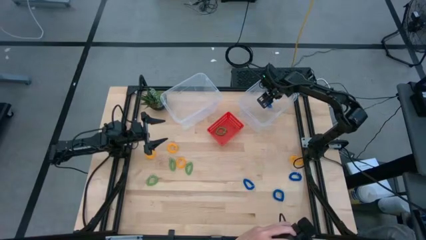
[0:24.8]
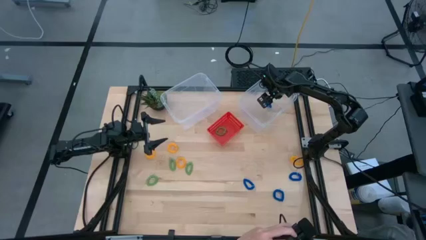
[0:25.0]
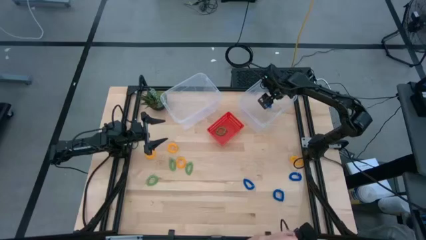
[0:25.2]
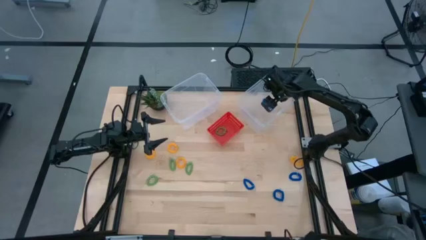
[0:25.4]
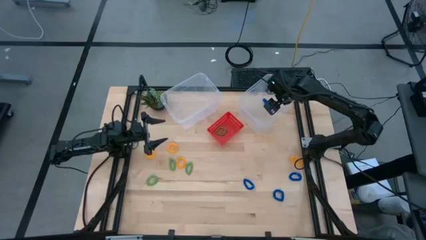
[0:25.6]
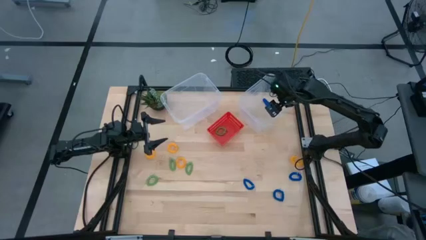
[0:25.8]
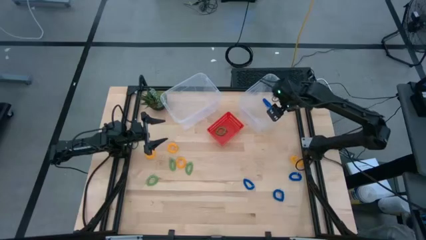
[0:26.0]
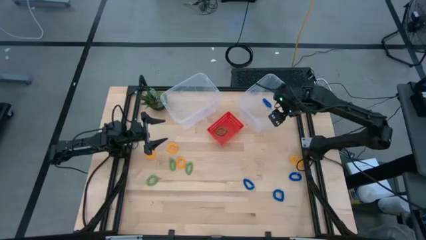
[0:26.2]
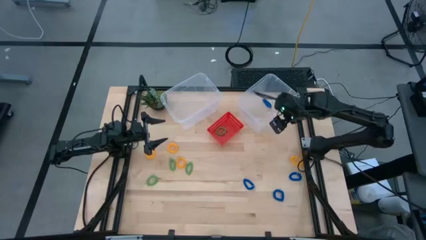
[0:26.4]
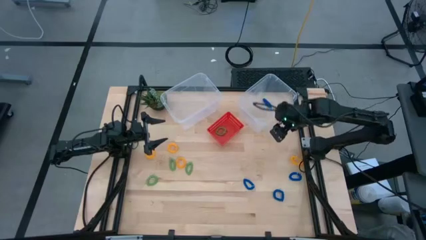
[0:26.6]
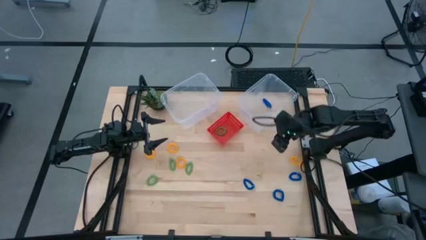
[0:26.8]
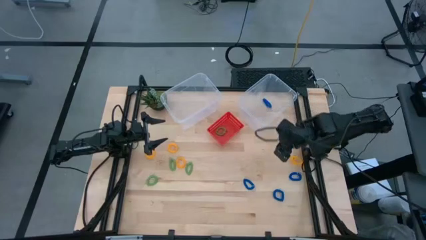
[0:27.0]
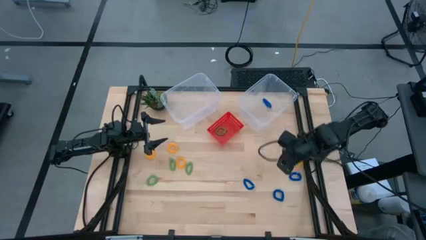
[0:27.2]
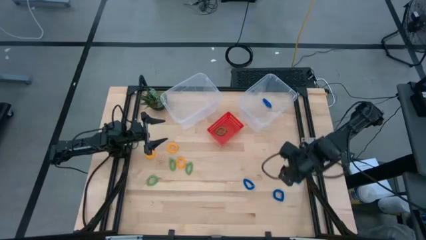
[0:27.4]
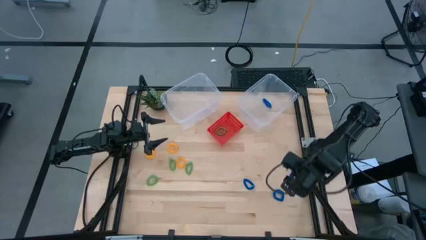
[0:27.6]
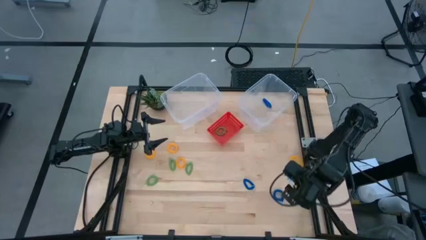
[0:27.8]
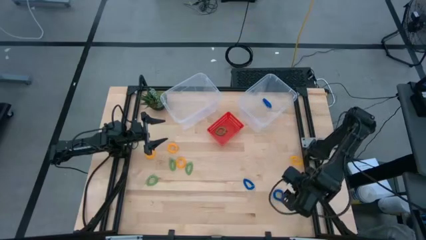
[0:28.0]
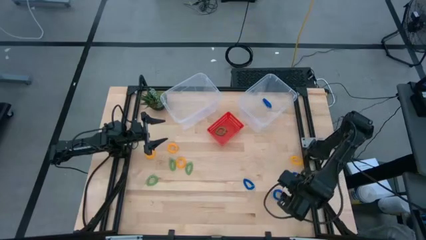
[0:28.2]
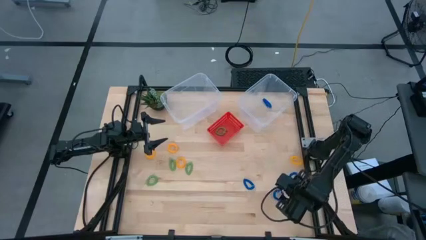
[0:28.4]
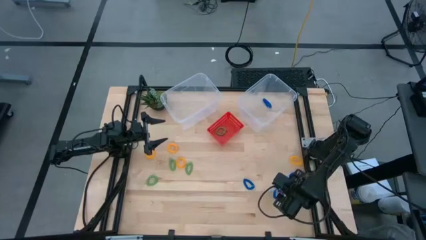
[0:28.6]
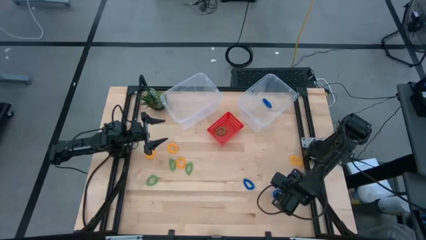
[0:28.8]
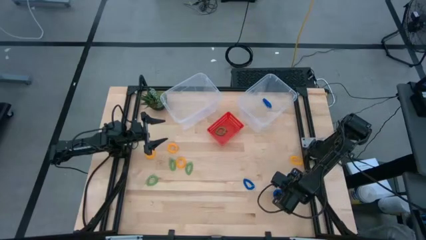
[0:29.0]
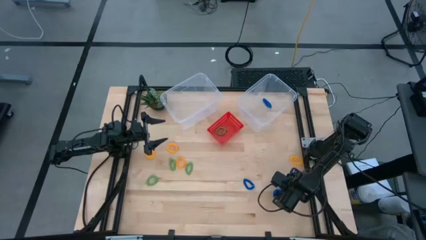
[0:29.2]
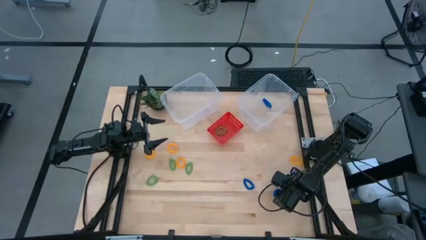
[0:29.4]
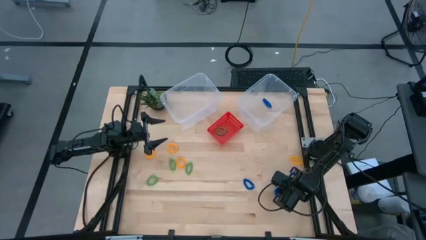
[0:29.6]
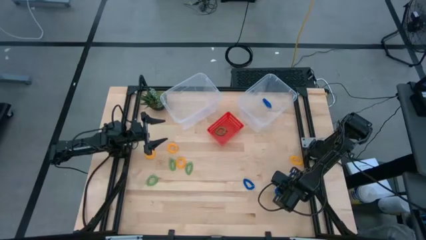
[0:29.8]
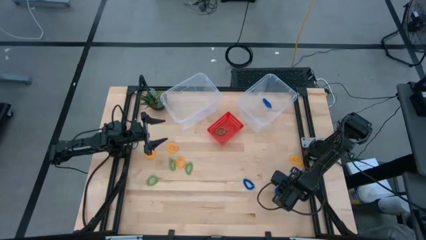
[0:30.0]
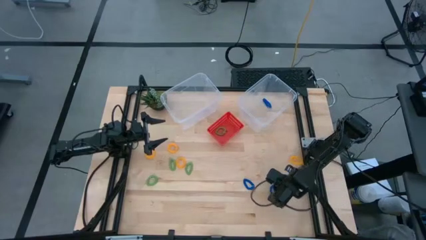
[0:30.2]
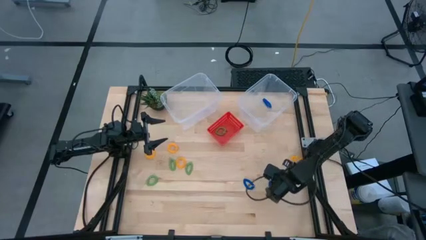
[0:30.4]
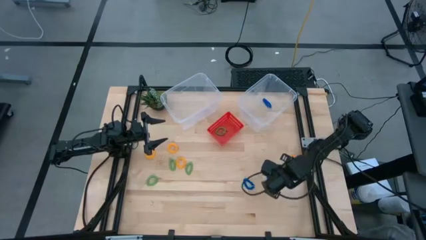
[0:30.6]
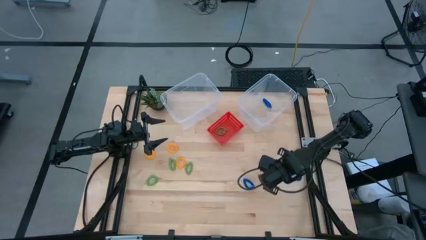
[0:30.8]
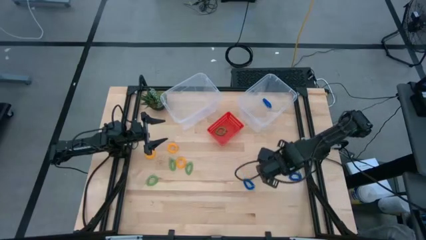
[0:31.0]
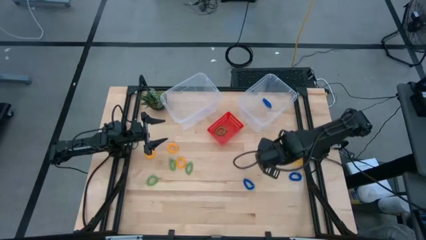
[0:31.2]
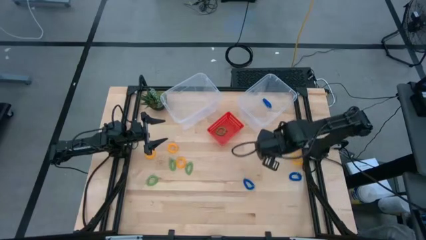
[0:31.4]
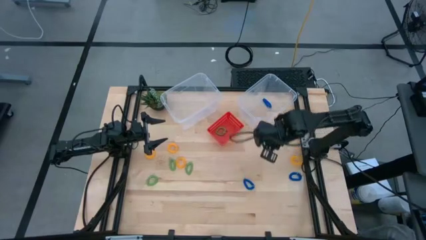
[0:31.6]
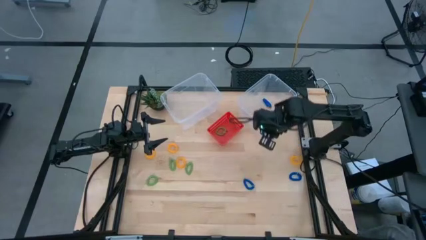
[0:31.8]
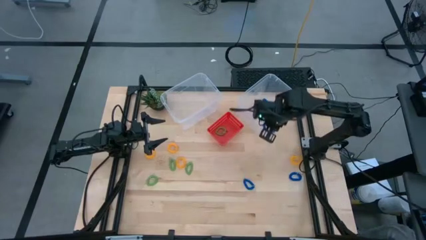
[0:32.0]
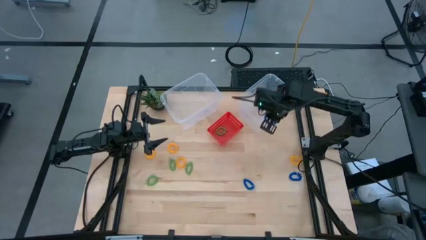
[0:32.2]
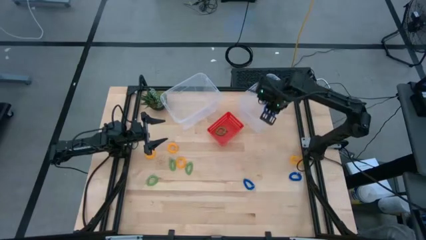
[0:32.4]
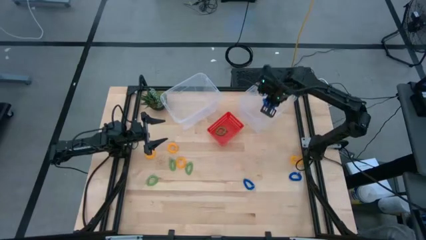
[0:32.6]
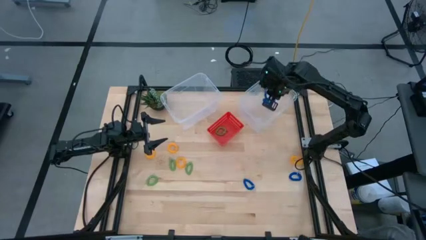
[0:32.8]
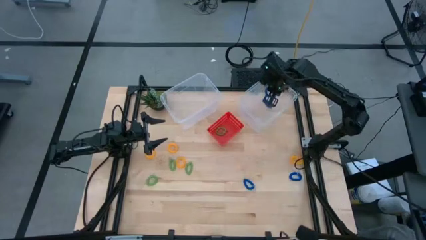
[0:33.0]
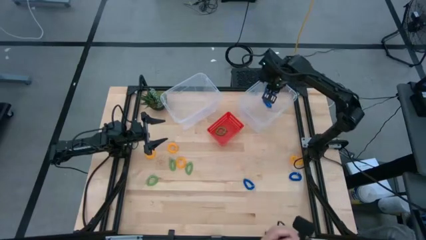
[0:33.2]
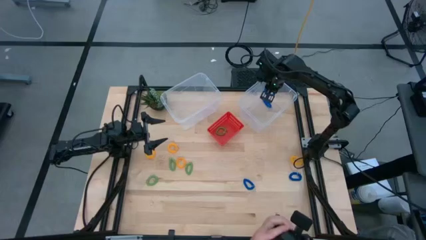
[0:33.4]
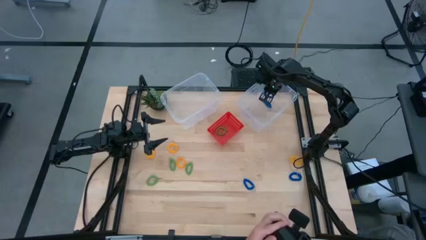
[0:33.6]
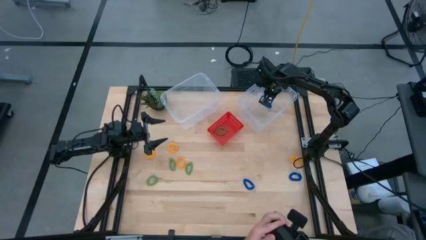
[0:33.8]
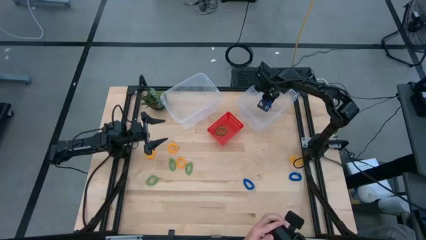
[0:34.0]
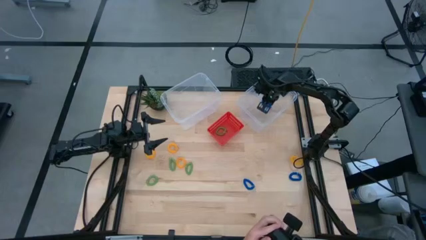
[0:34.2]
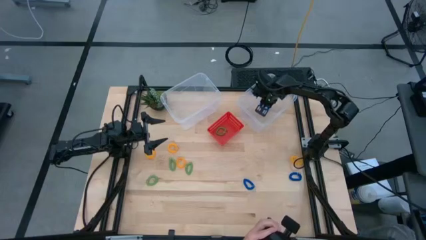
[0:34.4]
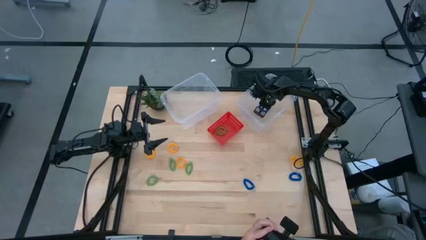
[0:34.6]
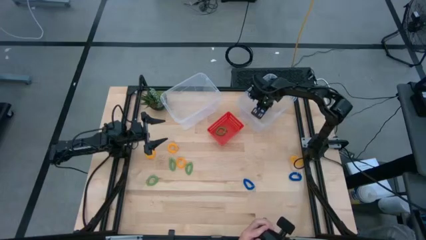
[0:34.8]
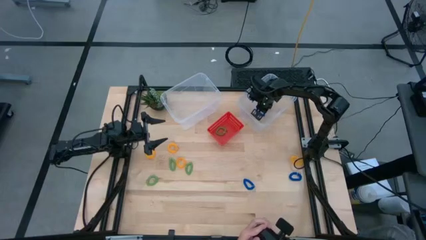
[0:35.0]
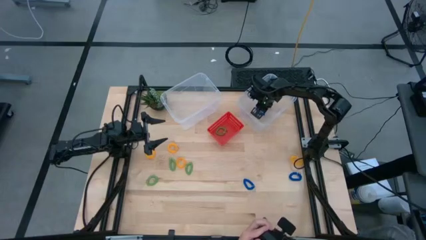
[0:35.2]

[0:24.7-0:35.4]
Task: Sort spring keychains
Put the blue spring keychain into the right transparent bin
